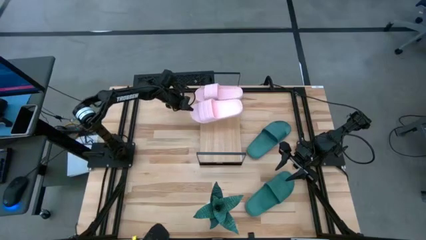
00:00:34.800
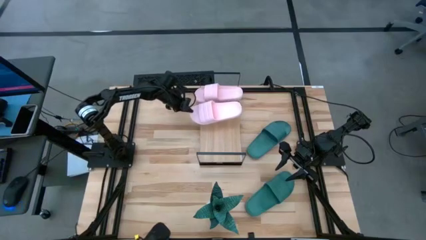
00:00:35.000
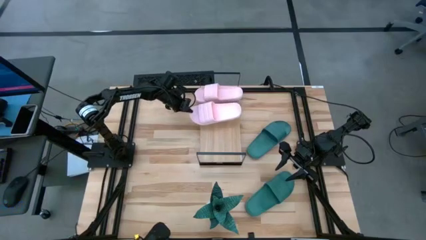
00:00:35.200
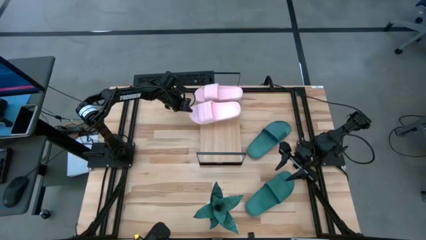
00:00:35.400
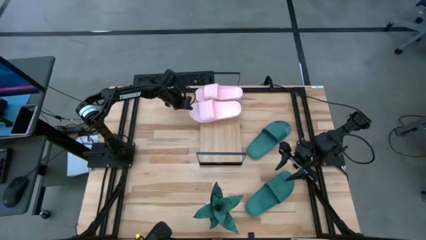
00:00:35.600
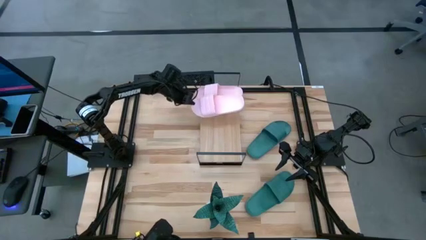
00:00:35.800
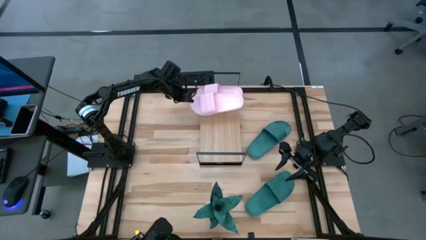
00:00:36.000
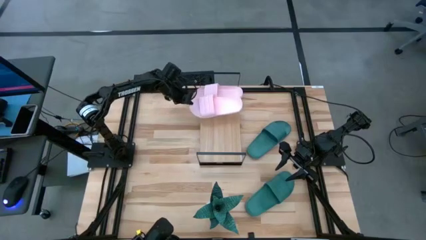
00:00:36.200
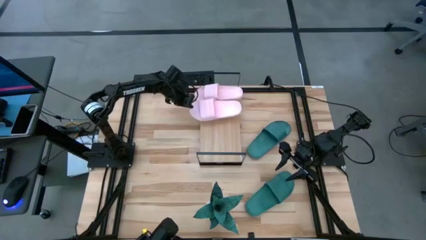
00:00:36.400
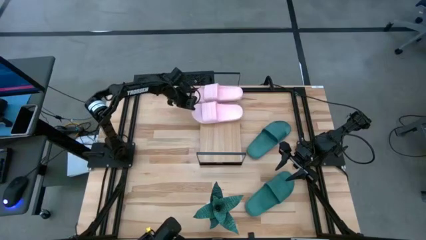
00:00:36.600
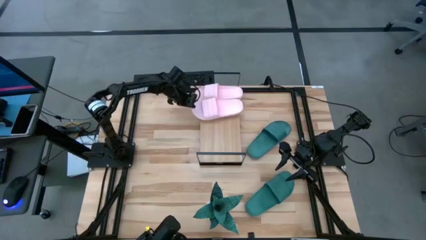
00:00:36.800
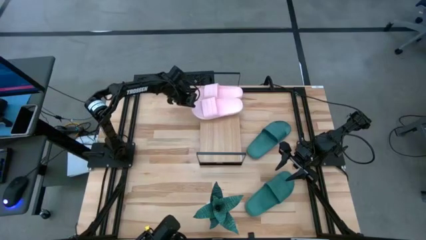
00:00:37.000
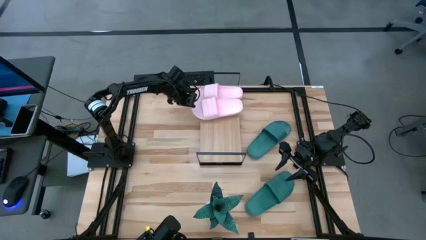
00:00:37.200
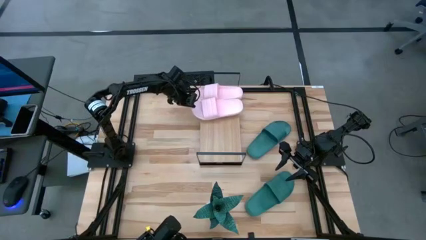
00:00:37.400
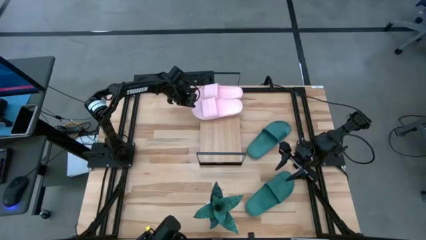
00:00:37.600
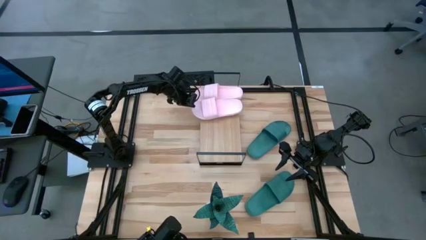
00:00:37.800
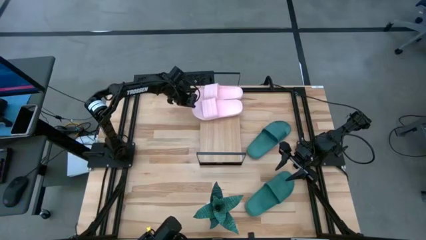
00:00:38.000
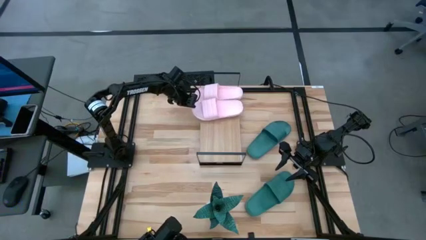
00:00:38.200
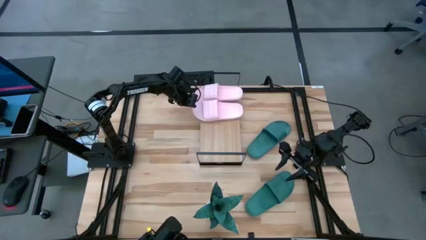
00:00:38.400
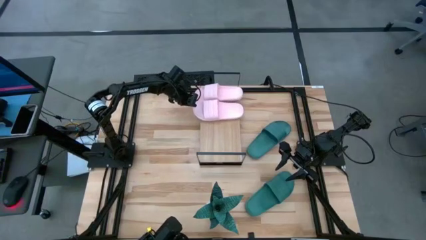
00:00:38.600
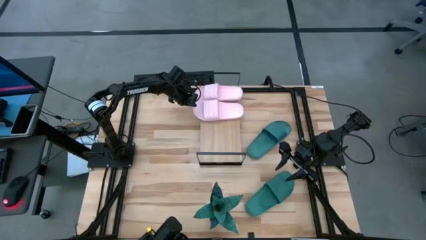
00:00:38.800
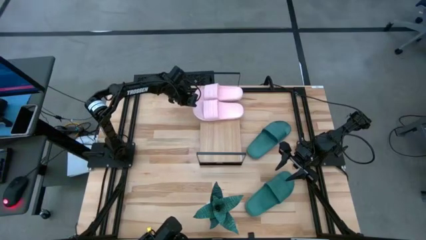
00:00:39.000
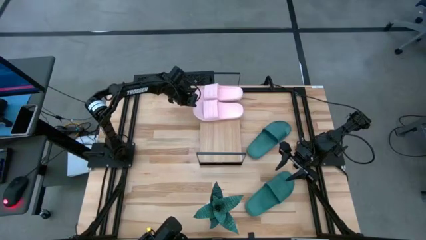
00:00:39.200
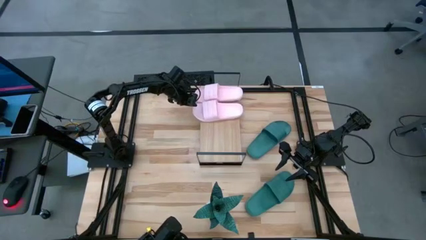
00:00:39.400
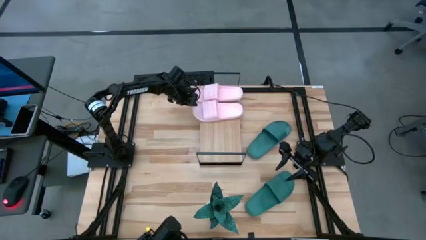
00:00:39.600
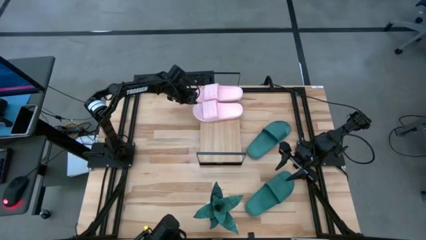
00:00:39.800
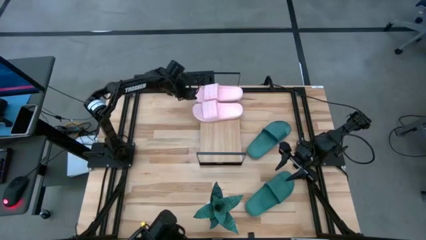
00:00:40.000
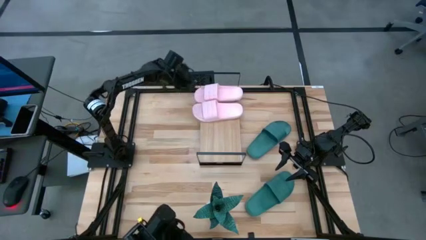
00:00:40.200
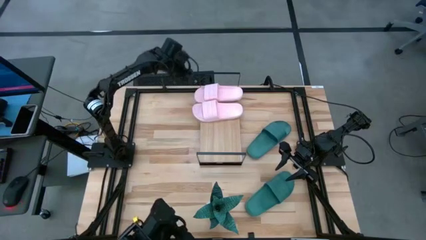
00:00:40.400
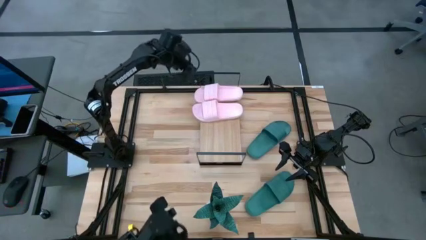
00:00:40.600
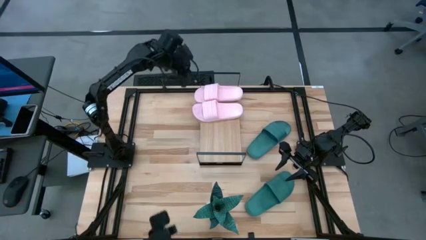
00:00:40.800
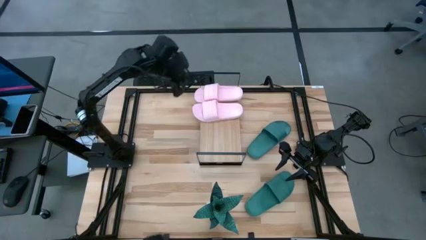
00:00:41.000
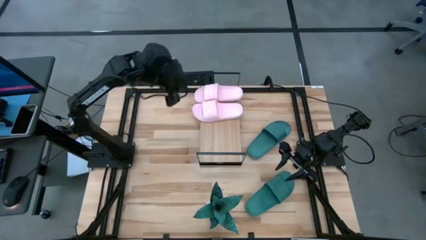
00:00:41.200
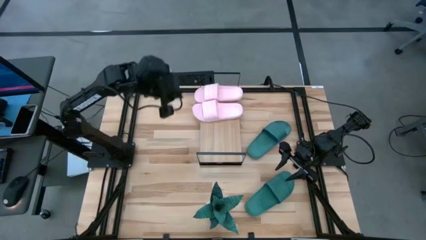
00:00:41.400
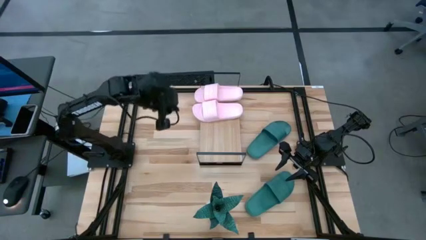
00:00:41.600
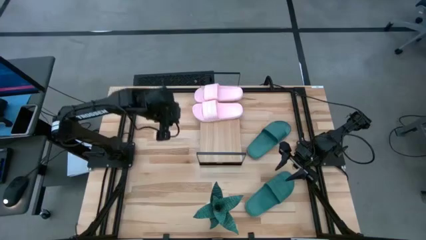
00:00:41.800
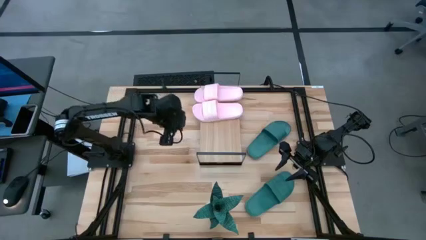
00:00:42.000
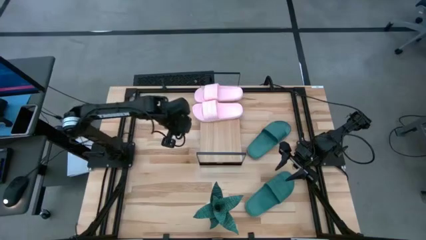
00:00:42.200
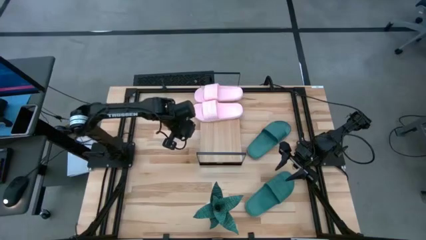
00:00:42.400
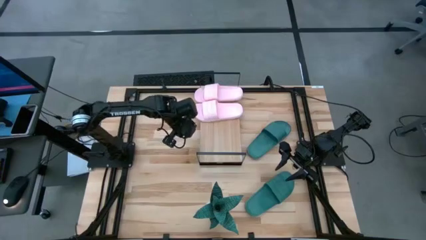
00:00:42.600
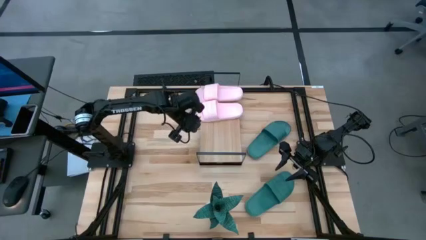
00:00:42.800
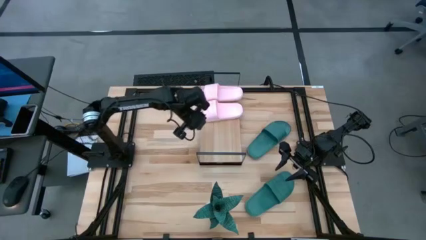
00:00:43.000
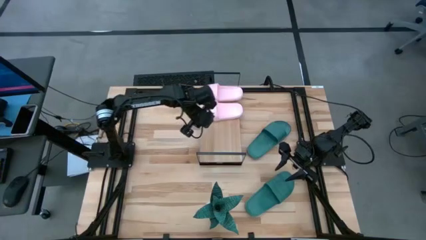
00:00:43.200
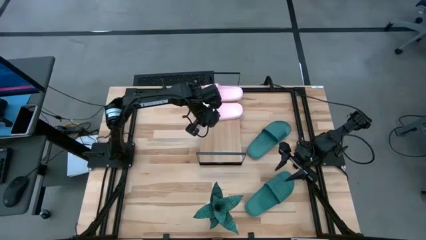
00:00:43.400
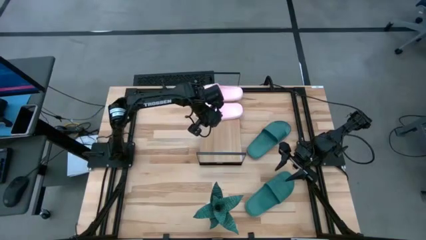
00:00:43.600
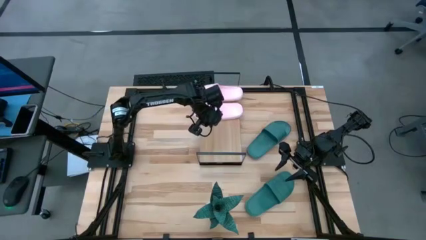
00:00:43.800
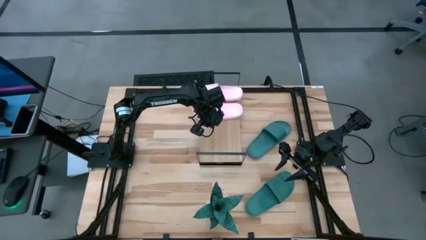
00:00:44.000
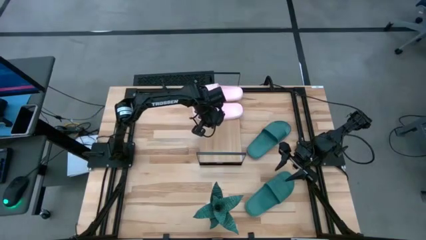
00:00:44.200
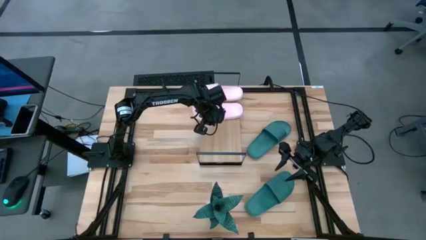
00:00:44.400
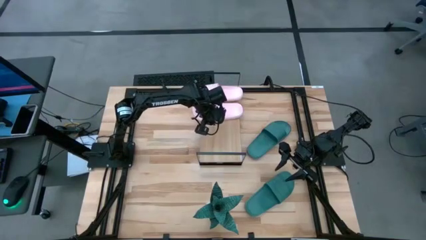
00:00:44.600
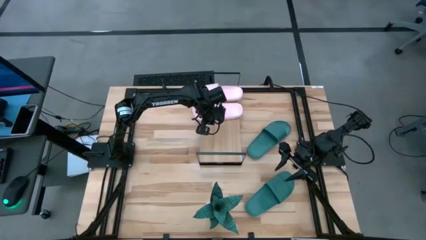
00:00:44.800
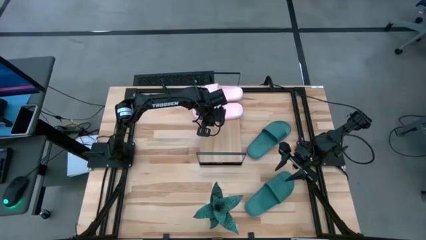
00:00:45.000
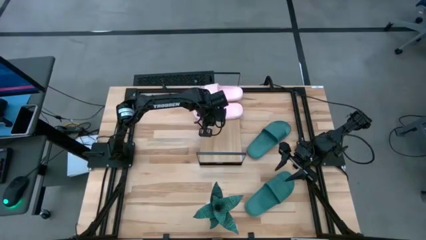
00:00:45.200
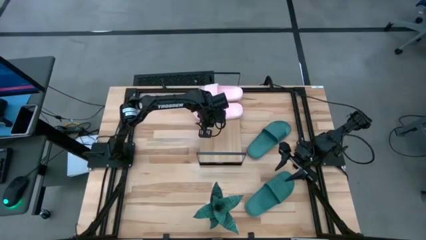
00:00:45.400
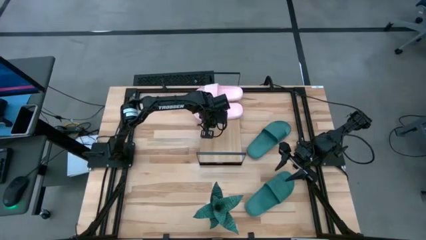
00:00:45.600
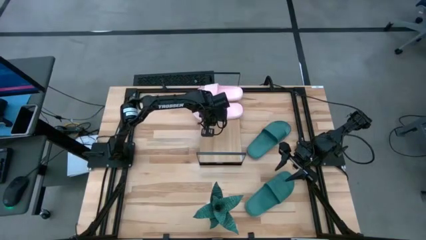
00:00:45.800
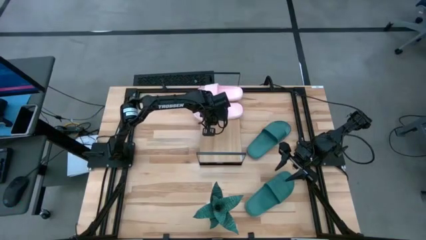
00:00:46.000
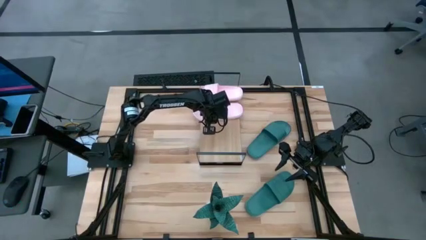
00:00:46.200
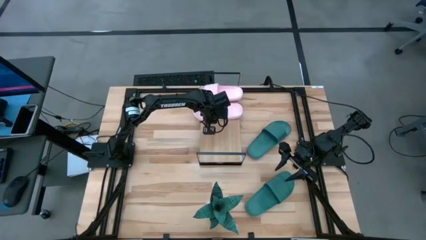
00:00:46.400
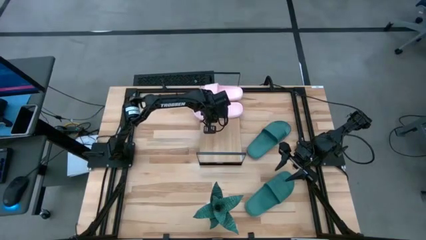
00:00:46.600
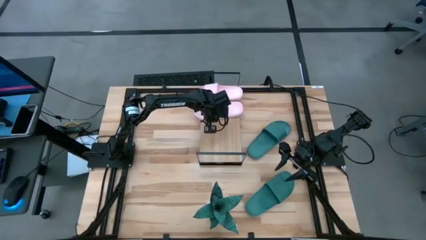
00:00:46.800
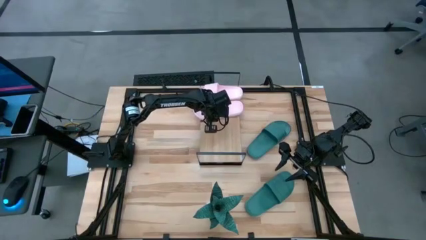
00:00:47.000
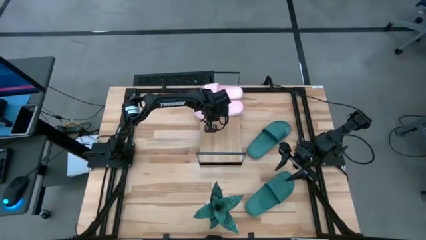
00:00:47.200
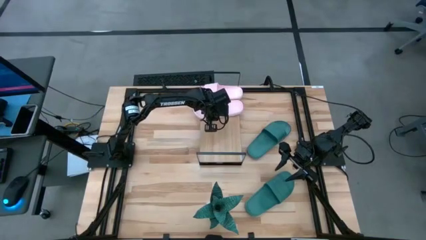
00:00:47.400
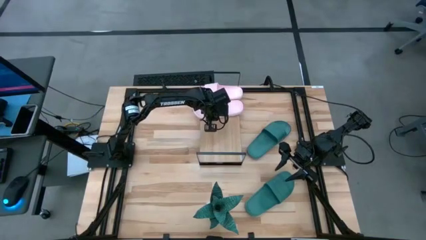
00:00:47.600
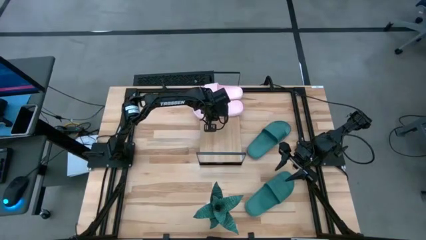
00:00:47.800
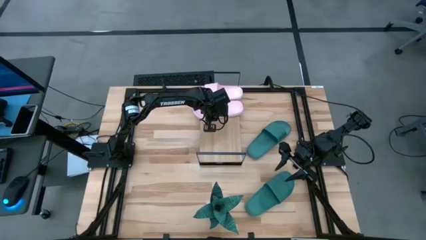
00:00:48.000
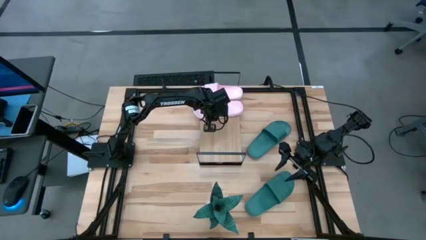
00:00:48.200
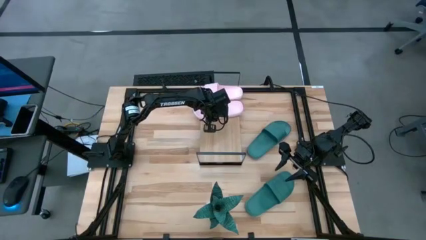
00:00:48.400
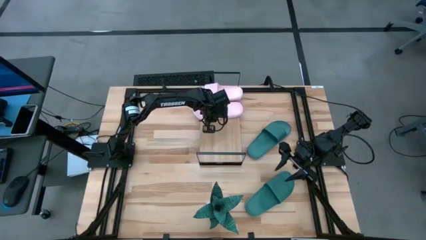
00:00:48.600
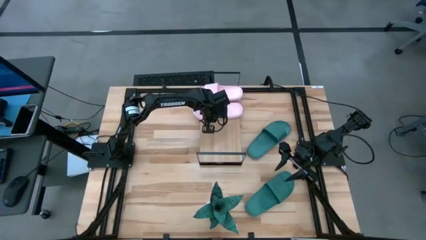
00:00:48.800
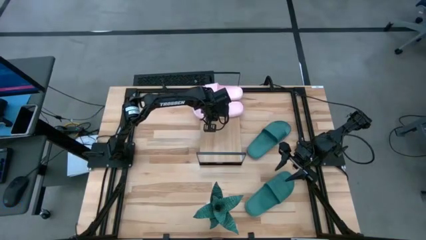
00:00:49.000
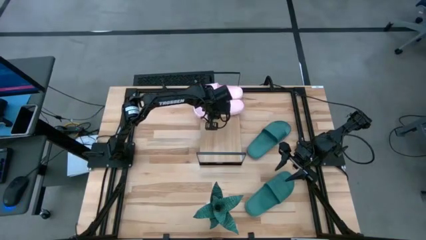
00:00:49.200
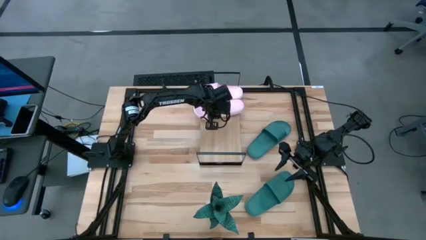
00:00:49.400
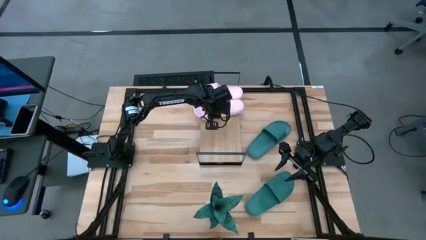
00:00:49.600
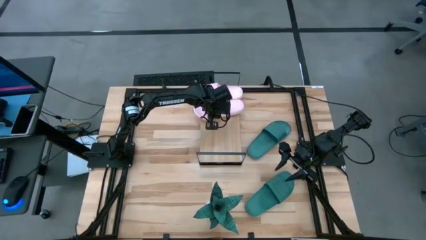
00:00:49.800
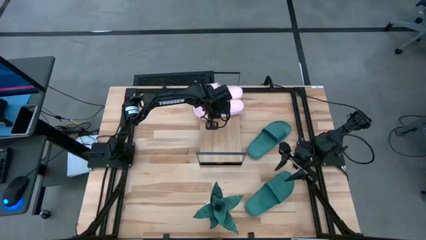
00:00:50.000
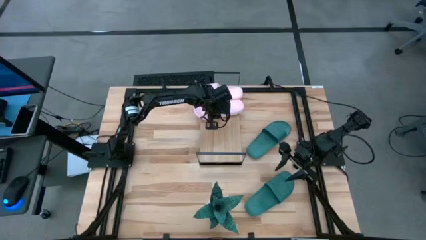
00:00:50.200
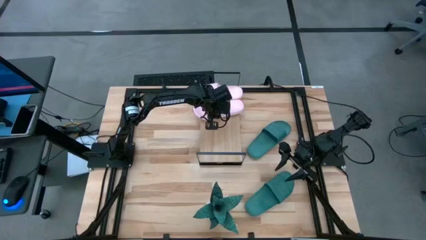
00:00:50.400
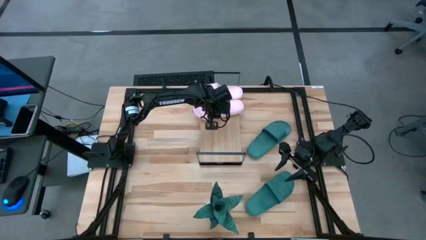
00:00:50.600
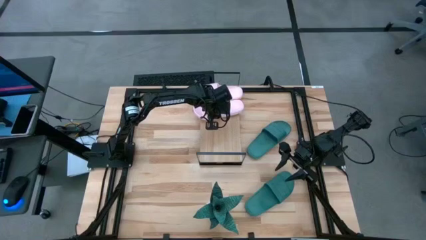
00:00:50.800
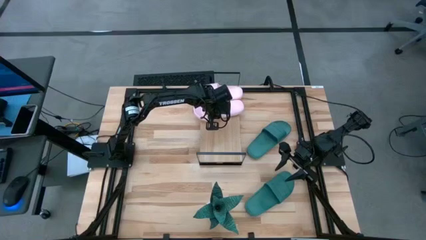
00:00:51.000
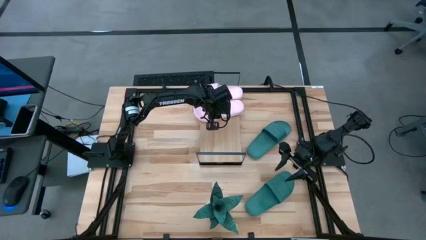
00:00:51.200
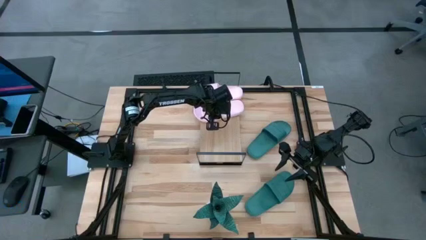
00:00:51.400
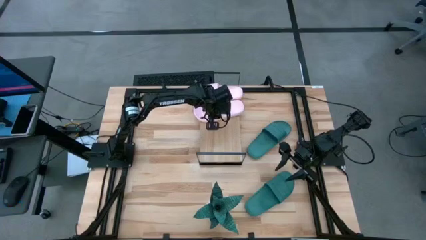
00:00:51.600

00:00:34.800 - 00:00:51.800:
Task: Pick and place slides into the shelf
Put the pink slipper on the shelf
